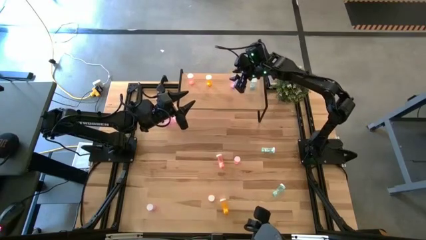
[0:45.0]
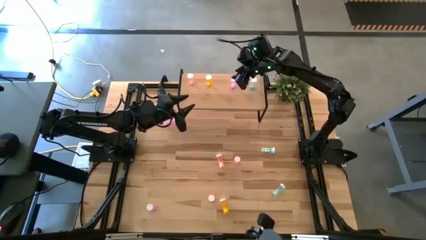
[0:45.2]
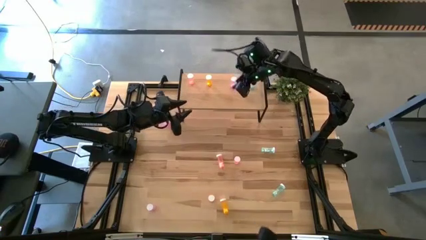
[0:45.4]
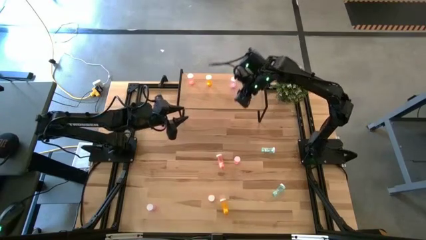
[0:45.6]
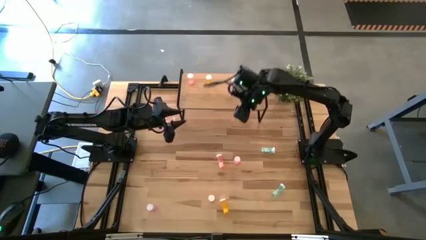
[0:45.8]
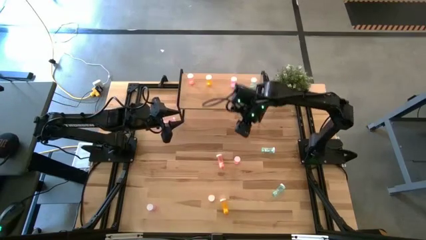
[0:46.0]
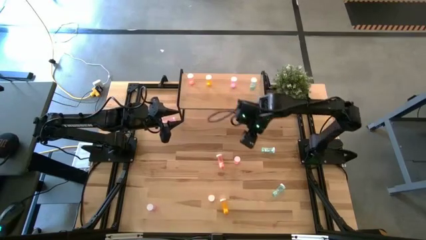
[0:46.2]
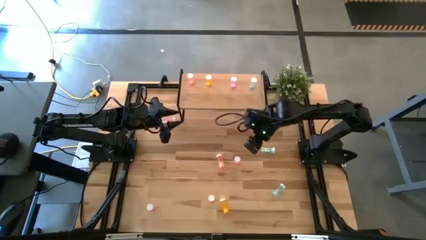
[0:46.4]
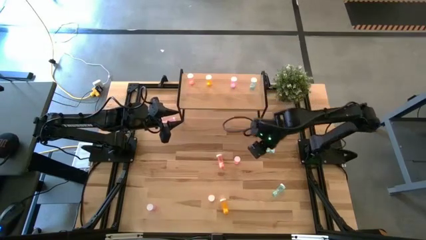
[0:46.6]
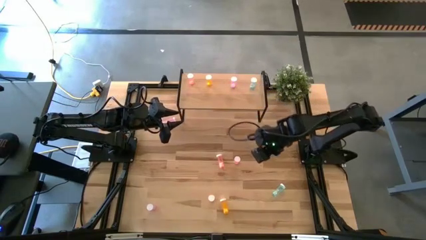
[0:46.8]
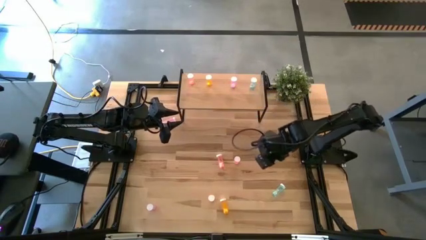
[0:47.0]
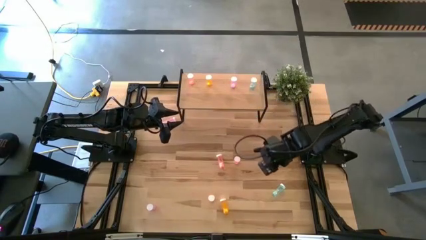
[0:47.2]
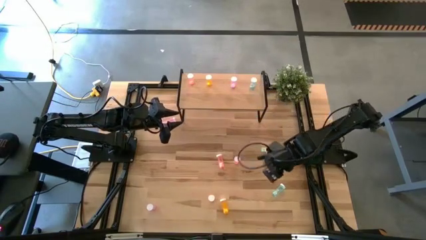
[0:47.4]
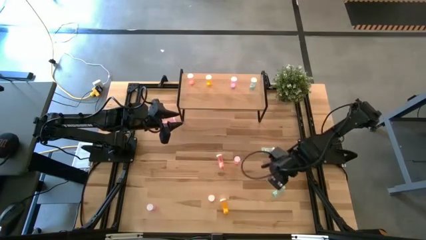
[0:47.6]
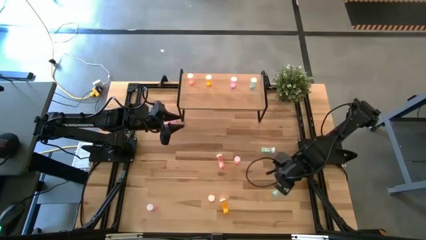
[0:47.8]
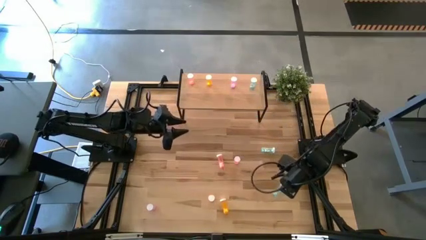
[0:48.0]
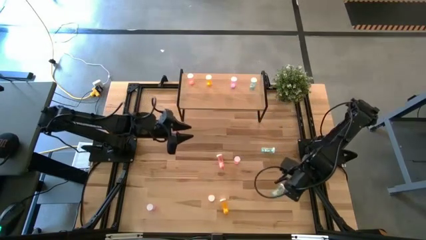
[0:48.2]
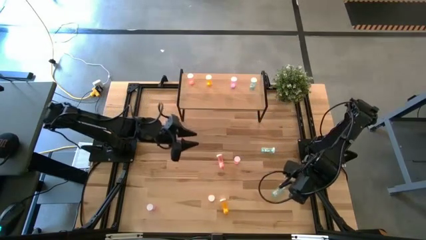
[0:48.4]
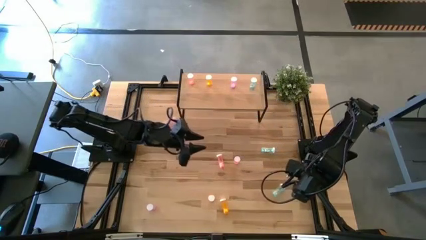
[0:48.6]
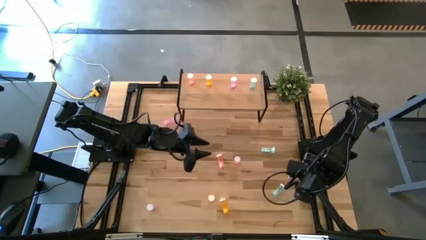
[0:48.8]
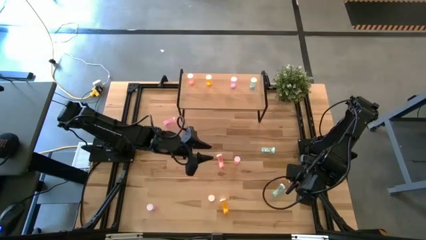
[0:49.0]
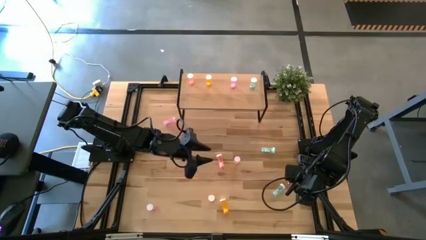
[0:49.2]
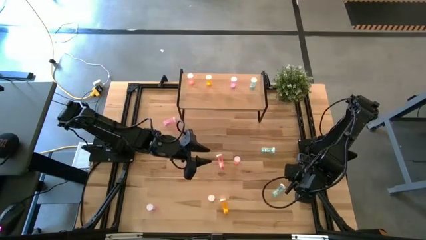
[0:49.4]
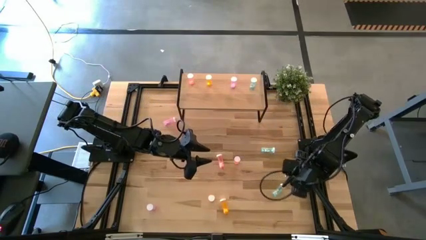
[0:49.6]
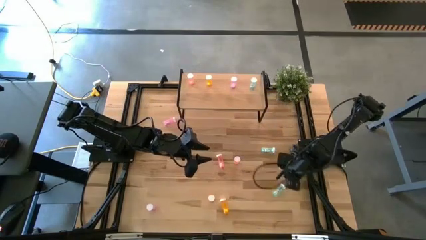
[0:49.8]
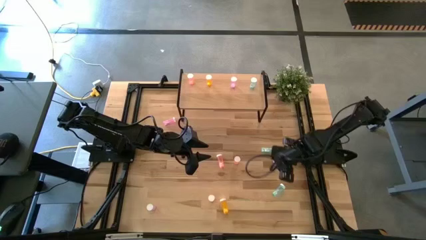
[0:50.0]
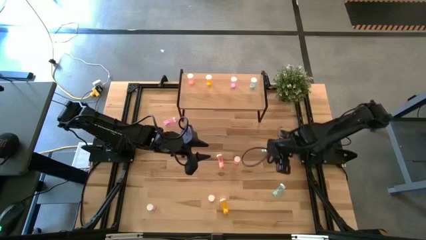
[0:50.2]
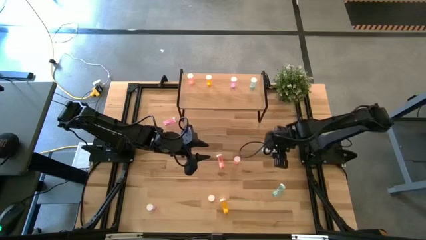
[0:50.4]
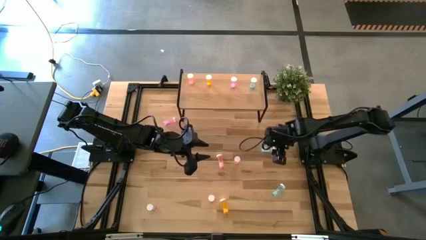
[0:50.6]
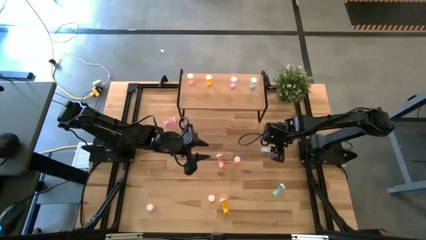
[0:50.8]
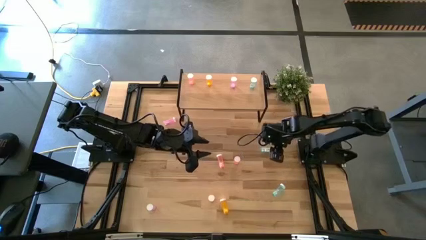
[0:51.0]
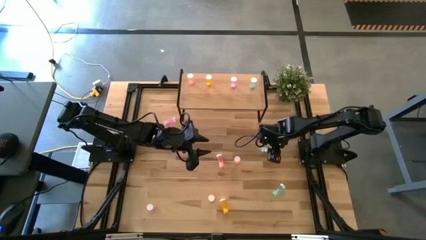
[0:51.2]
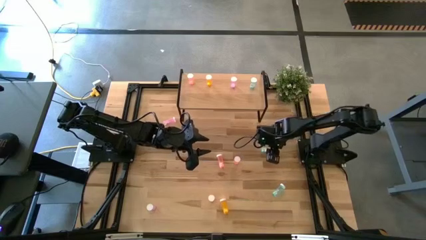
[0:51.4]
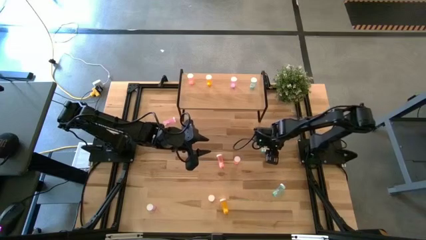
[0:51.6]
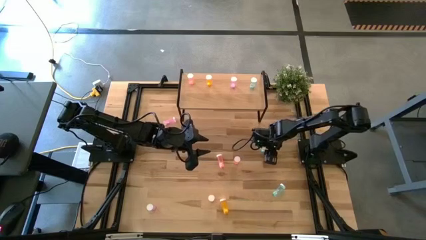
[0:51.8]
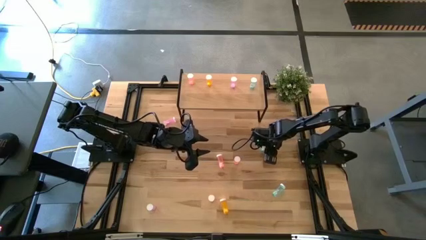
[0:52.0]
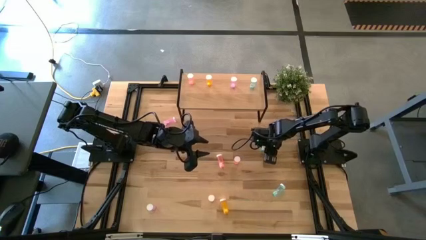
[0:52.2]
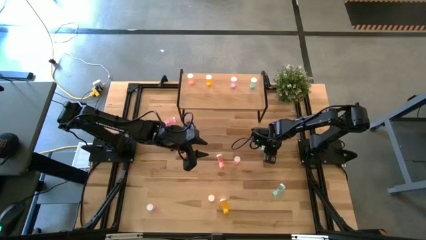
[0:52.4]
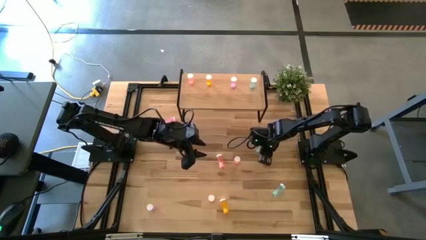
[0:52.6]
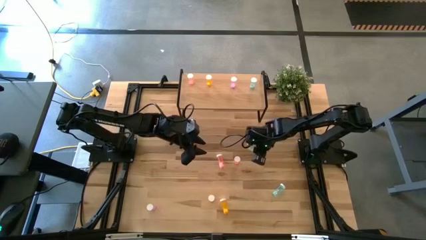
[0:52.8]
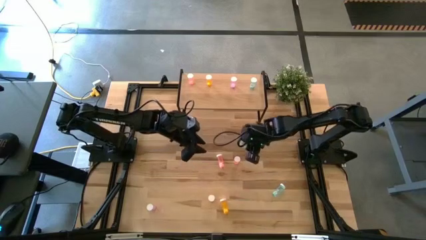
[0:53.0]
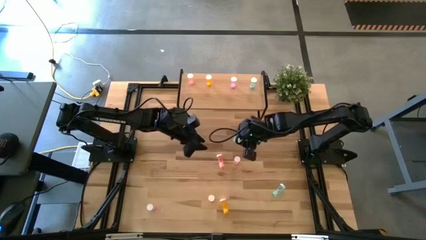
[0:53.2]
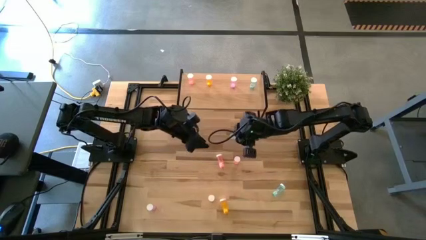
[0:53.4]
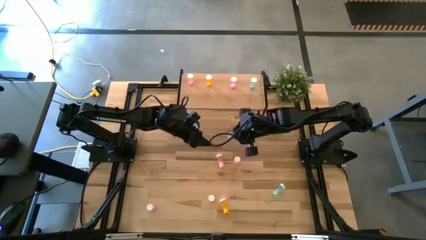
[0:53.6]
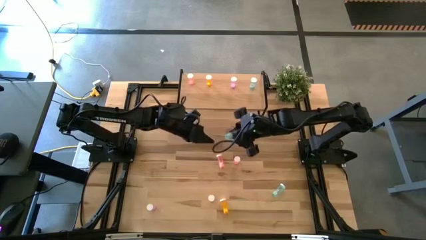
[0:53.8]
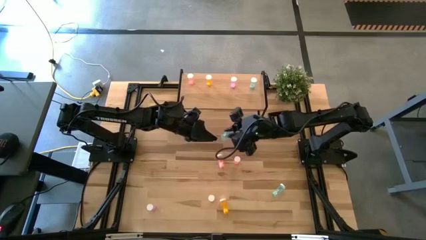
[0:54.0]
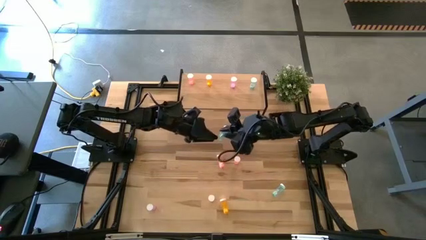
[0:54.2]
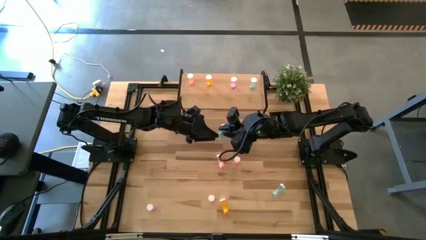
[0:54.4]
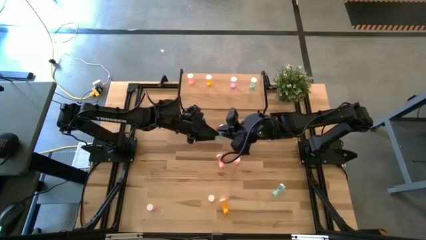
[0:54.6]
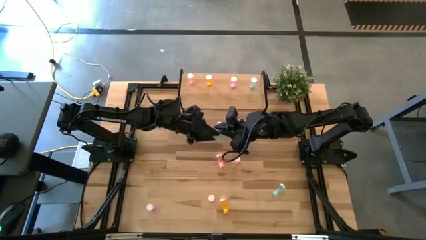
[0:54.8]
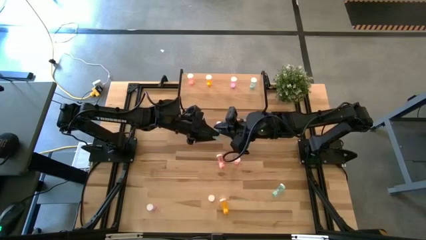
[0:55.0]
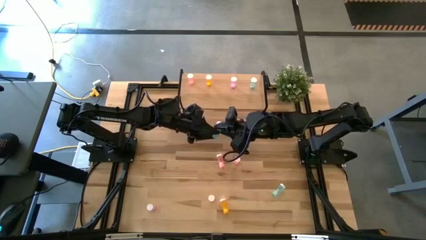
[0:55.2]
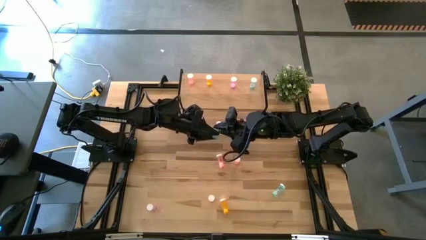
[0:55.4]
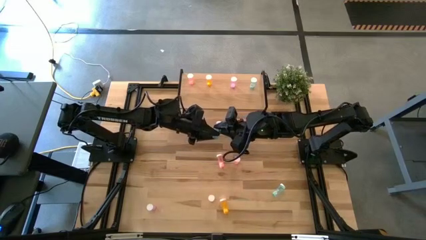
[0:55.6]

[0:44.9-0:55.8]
Task: Pick and place medicine bottles onto shelf by color
Put the top blue pill bottle on the shelf aligned with the other blue pill bottle

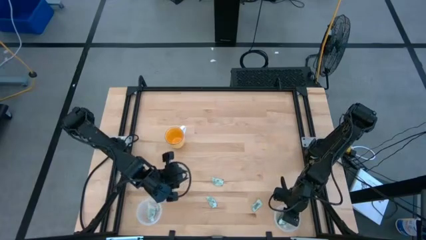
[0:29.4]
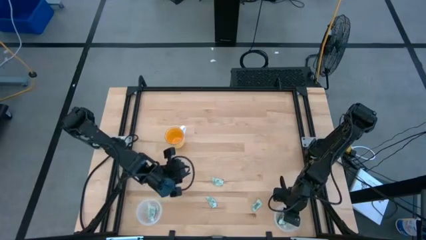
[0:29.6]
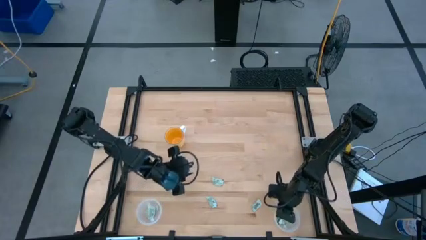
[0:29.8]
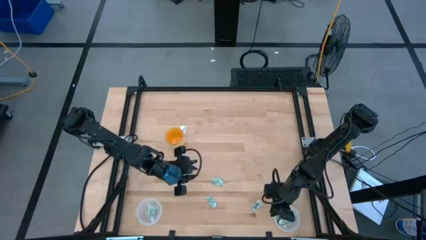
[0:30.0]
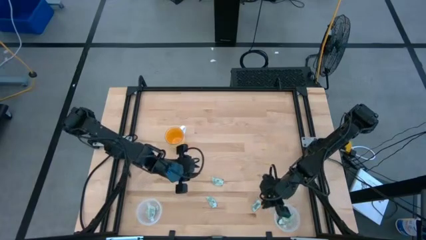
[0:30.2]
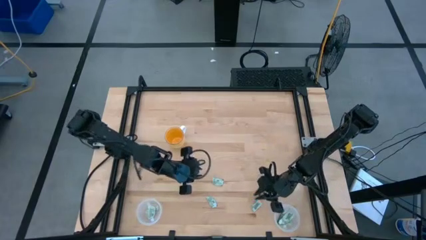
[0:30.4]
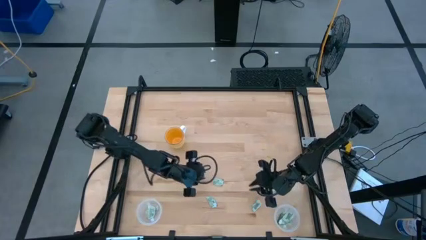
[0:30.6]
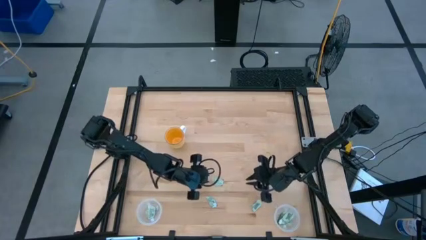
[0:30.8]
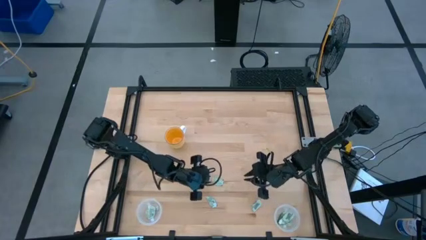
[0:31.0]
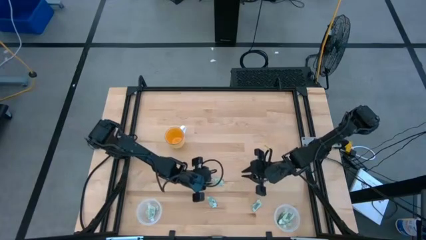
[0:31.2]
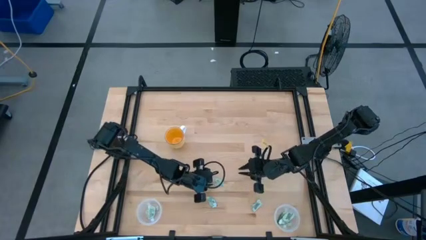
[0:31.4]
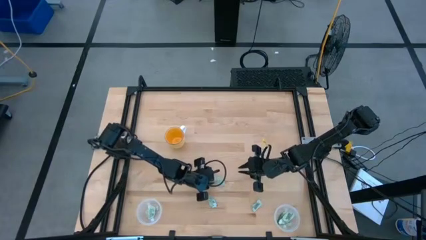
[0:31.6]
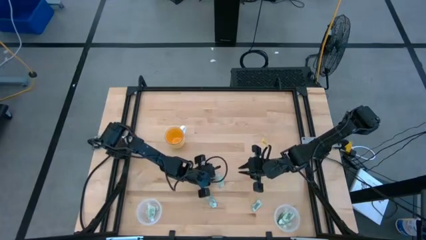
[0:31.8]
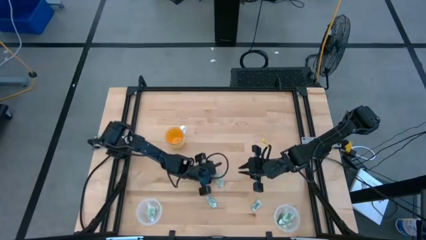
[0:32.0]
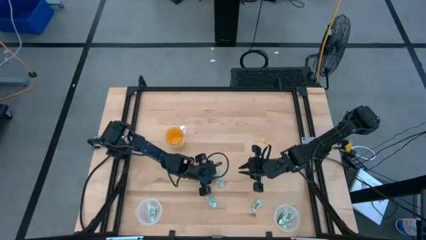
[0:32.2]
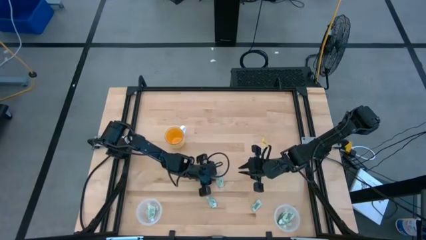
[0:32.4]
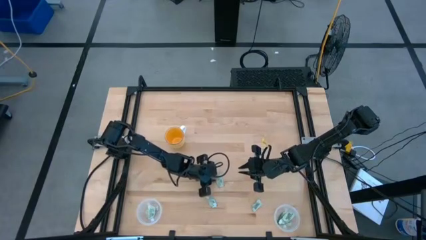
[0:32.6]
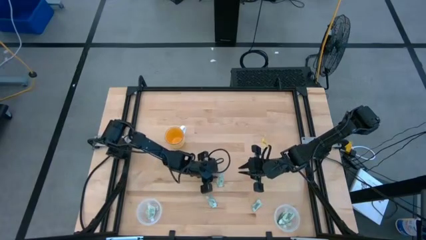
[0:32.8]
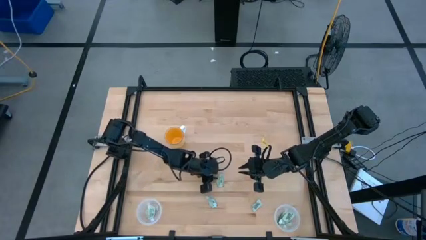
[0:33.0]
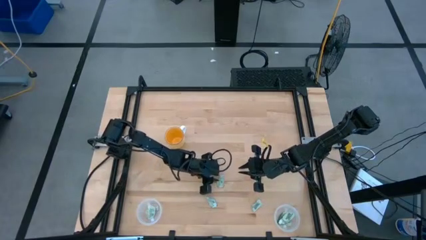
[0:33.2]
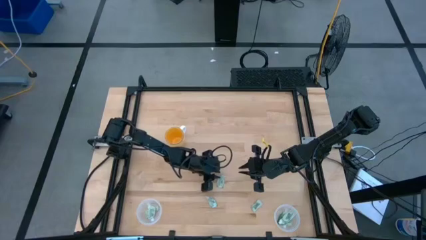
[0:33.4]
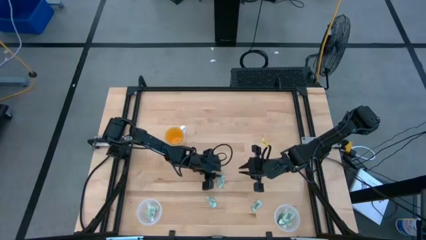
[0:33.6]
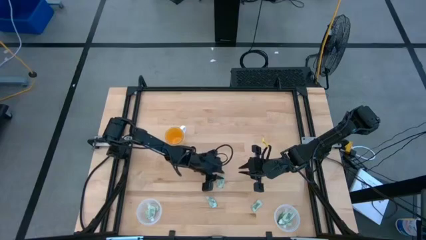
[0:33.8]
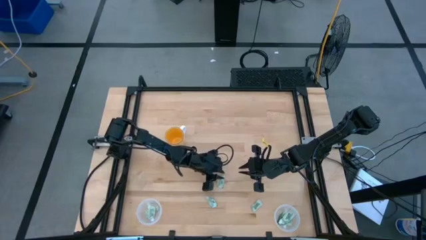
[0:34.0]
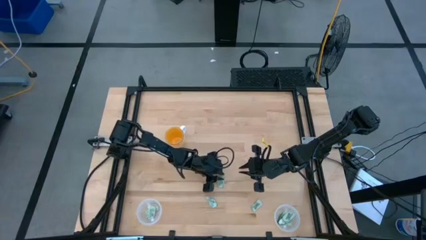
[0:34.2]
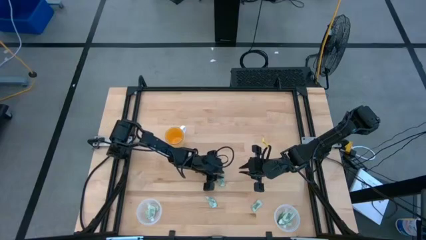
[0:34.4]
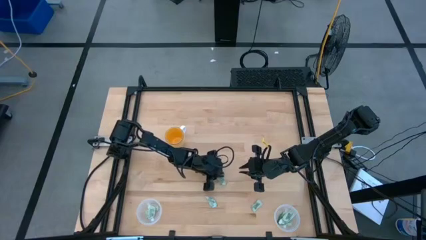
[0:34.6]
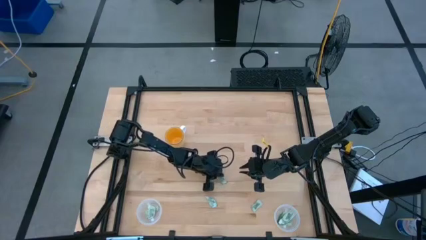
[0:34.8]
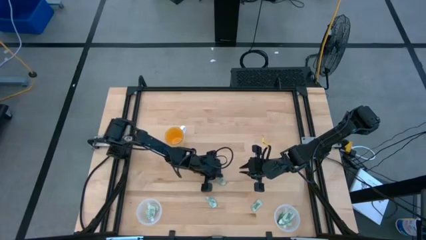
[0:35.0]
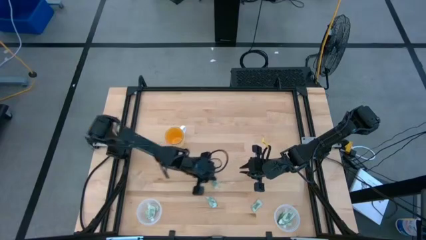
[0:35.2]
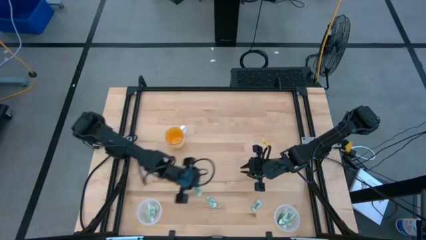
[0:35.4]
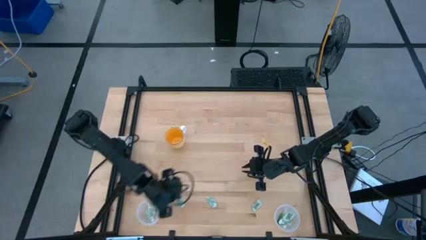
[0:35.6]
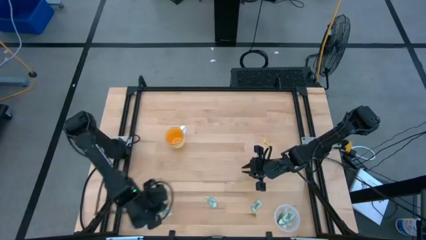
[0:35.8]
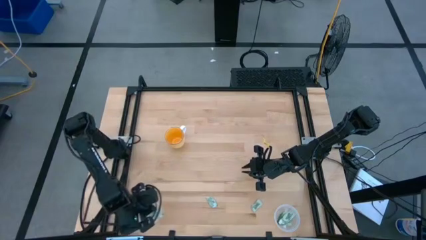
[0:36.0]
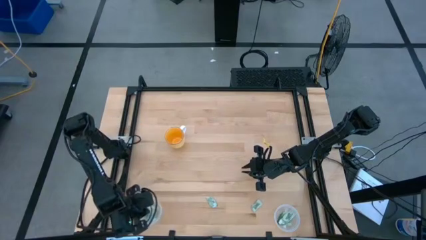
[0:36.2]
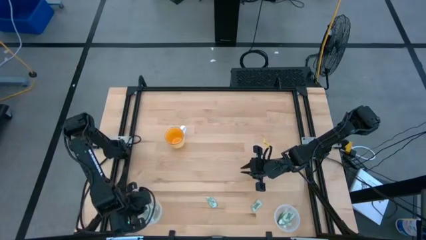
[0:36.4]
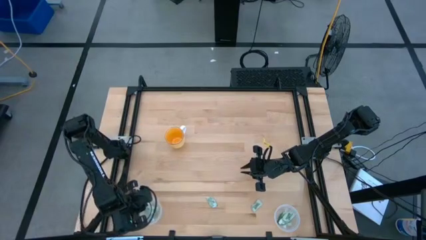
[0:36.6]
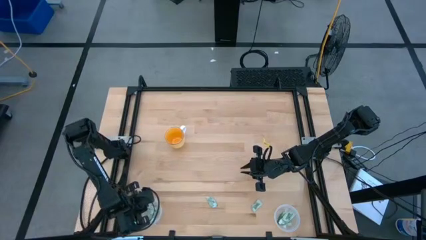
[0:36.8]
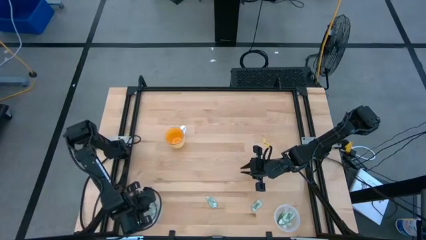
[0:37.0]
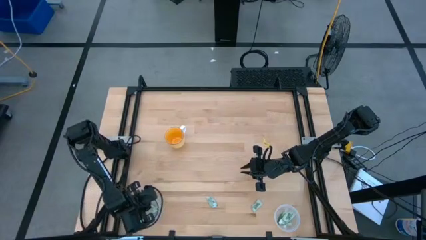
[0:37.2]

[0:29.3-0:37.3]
Task: Pick and place items into bin
Put the stevia packet into the left transparent bin
